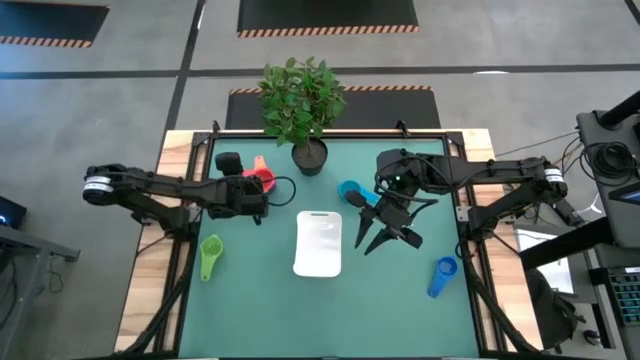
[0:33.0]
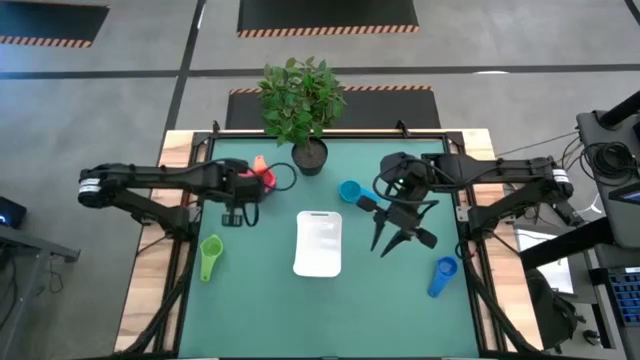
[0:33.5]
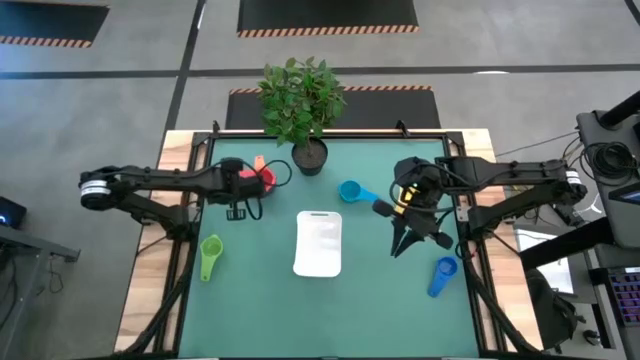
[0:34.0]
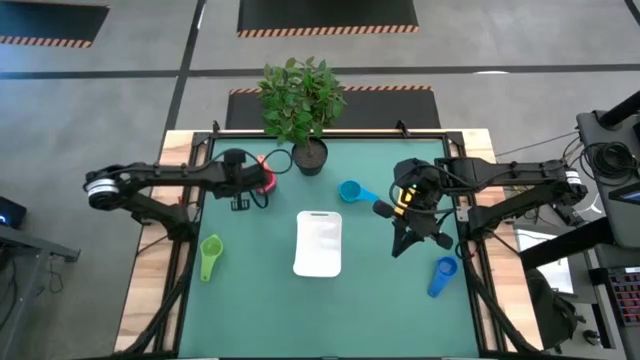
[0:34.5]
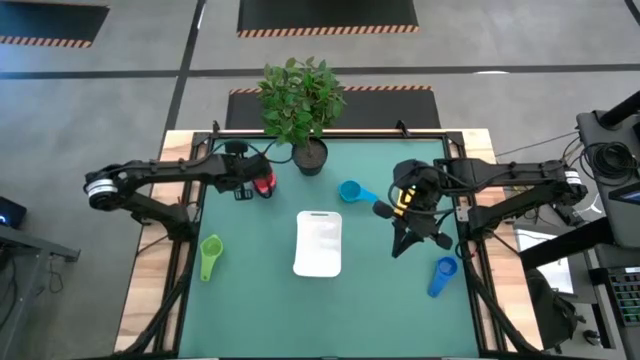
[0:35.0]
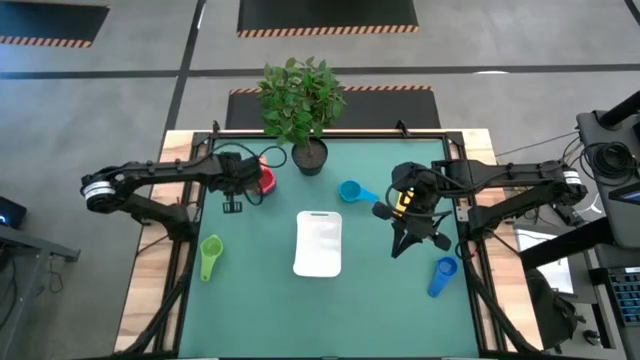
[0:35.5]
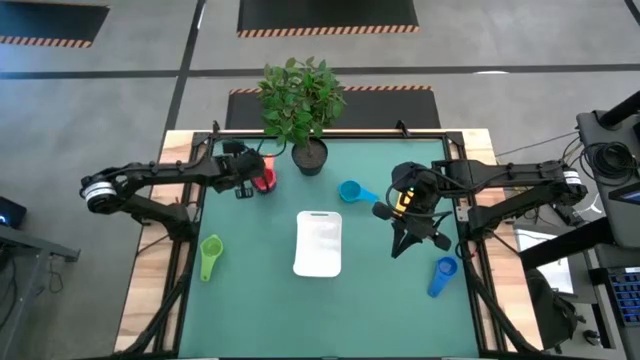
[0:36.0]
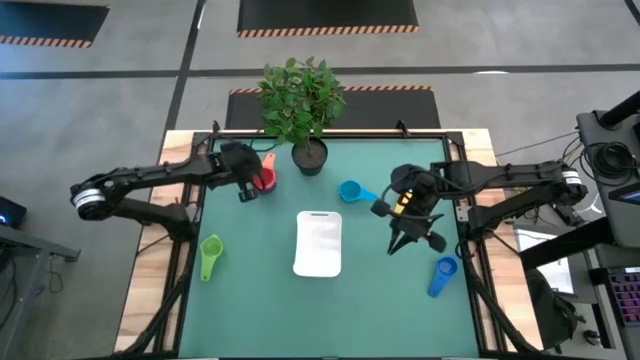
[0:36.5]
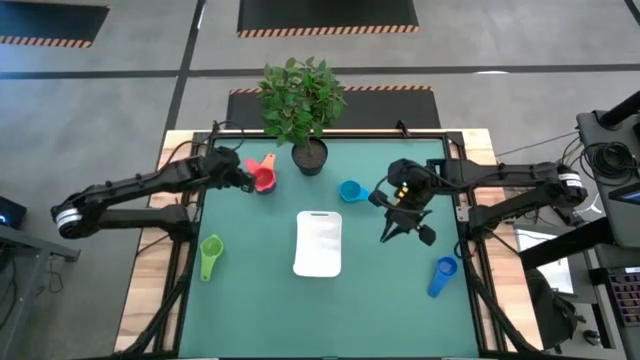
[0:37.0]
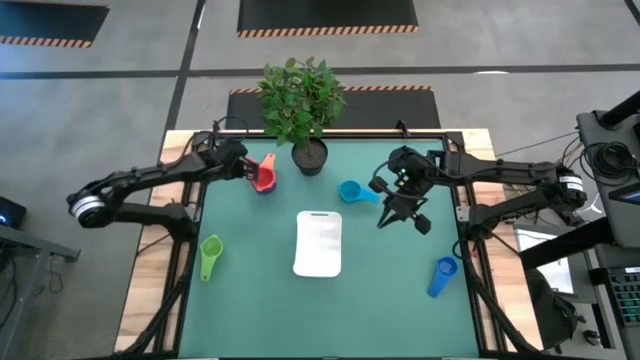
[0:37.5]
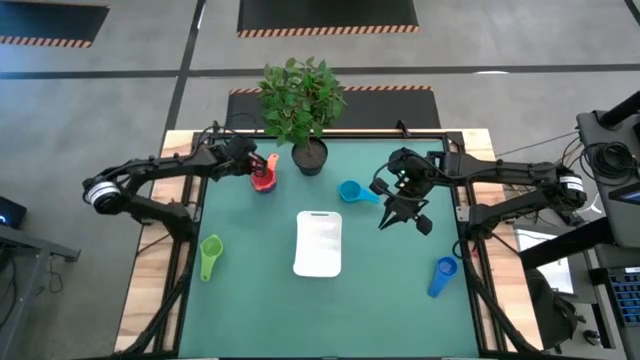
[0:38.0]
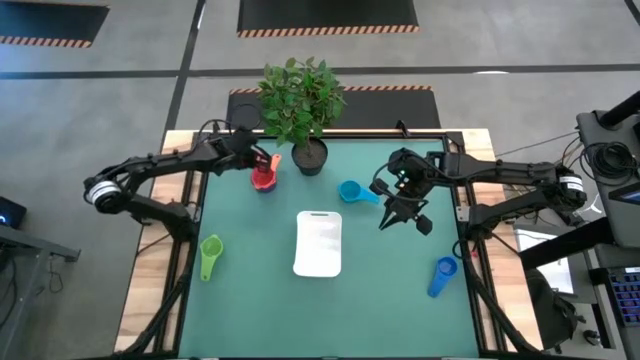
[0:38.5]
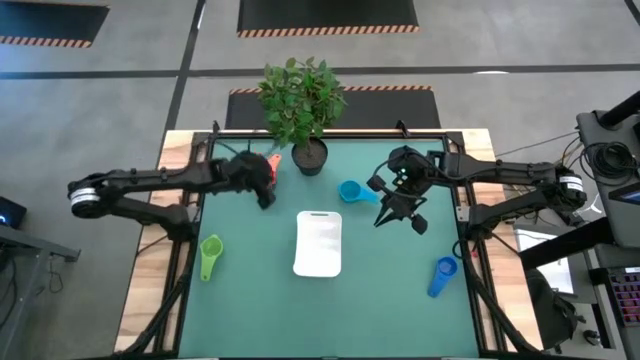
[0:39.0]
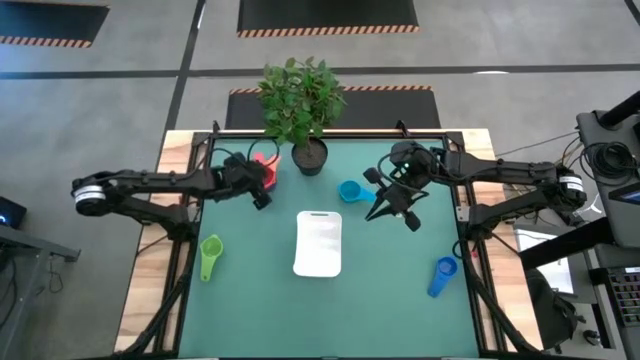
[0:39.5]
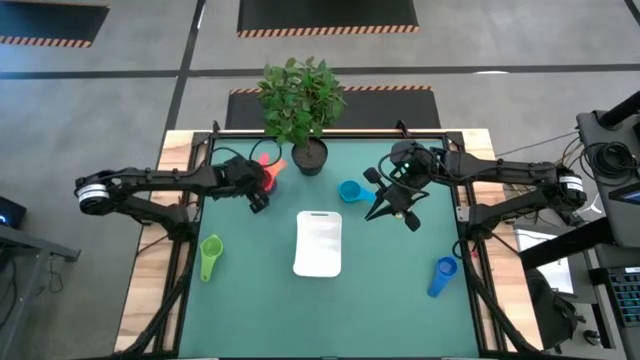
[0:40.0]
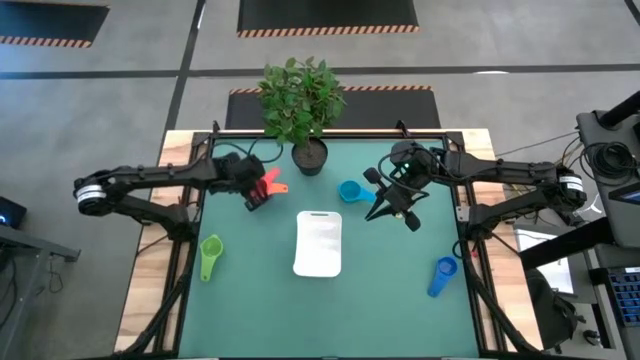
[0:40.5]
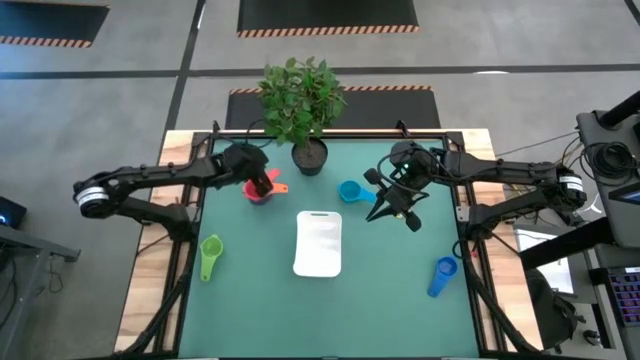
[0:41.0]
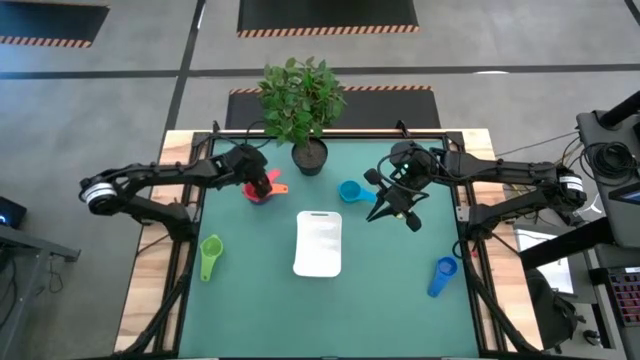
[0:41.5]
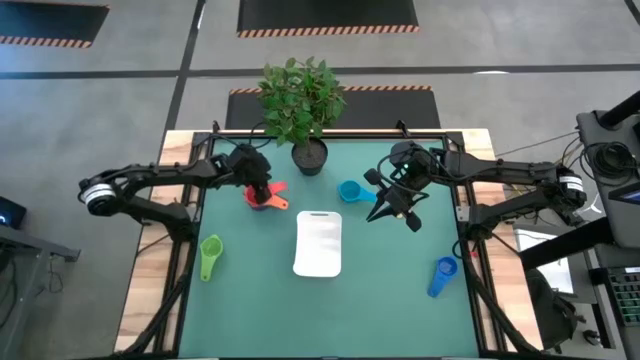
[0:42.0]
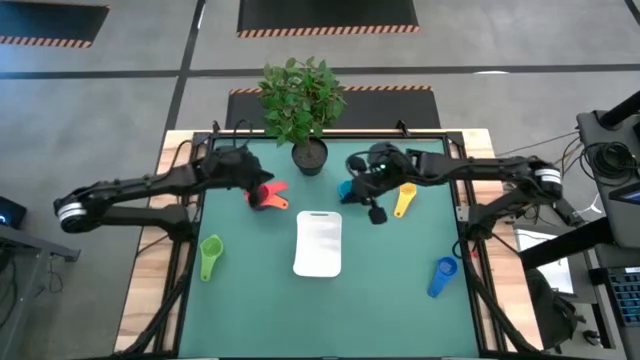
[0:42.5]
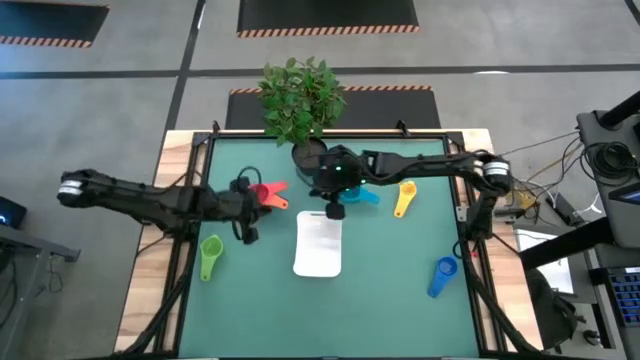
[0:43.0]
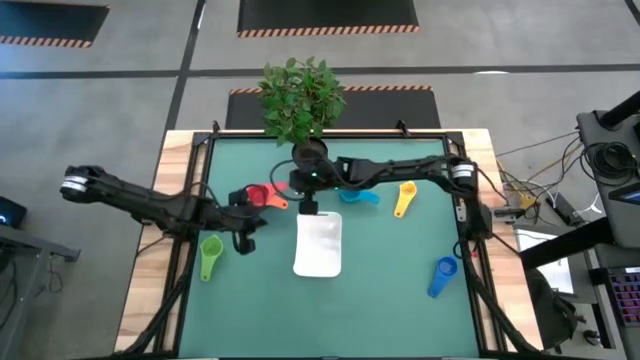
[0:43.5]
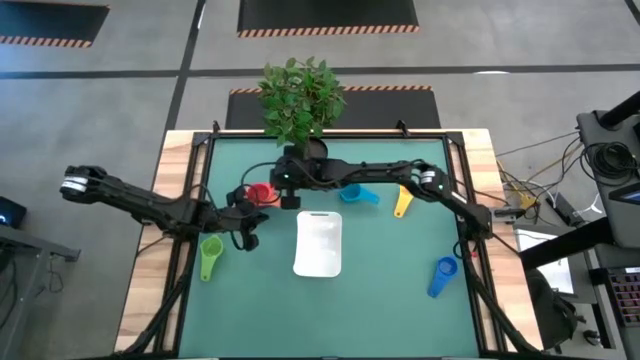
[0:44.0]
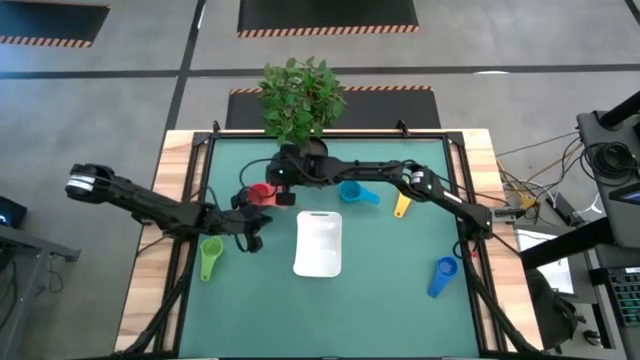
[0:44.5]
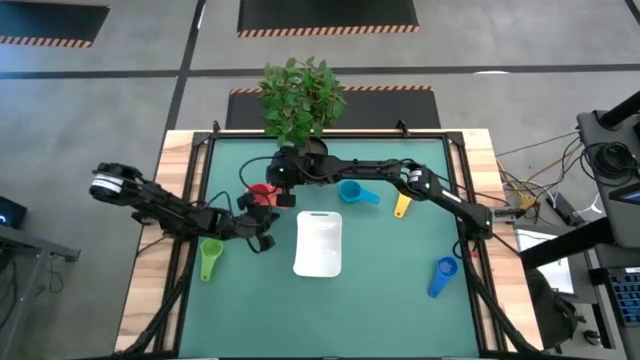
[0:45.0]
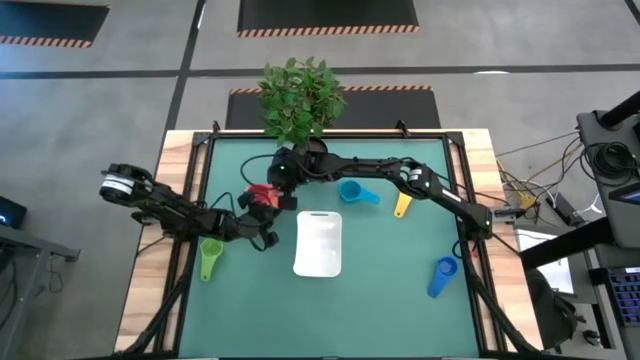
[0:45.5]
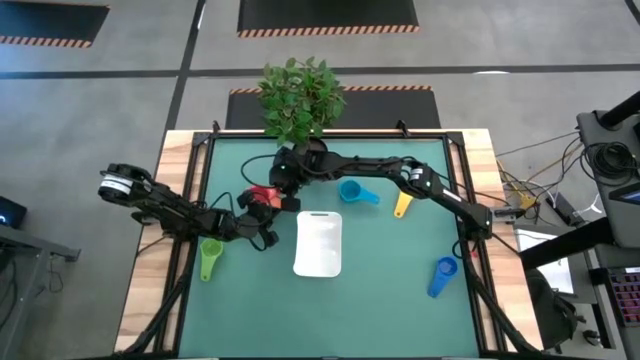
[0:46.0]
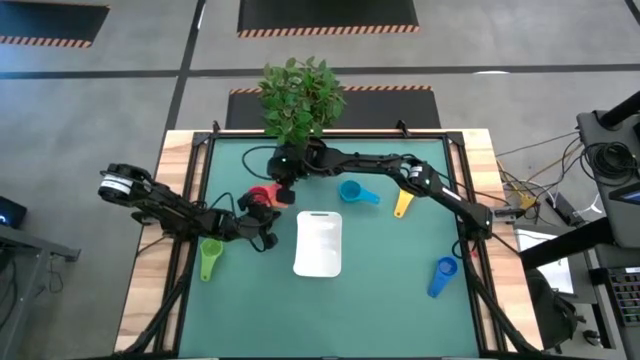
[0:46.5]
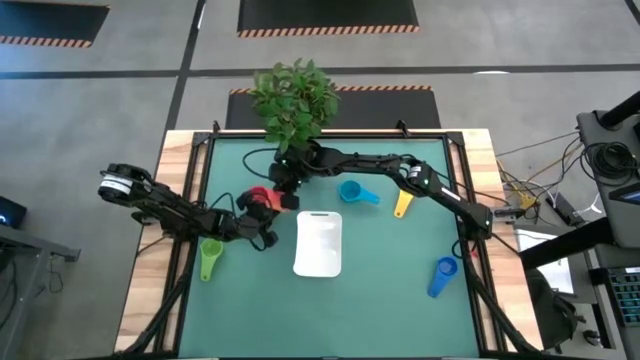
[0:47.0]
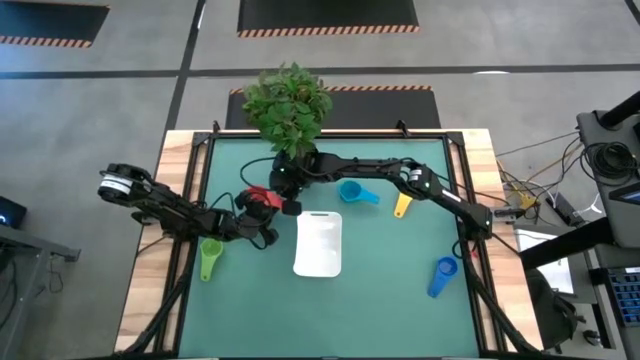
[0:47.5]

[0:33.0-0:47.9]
Task: Nest measuring cups in basket
Stack the red measuring cup on top of the orange measuring cup

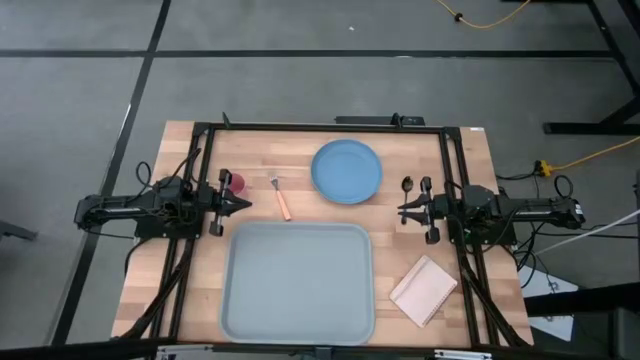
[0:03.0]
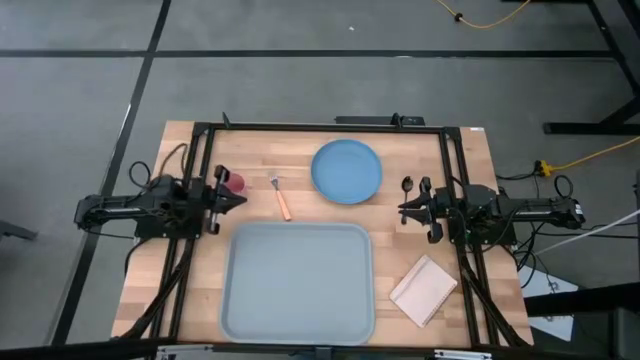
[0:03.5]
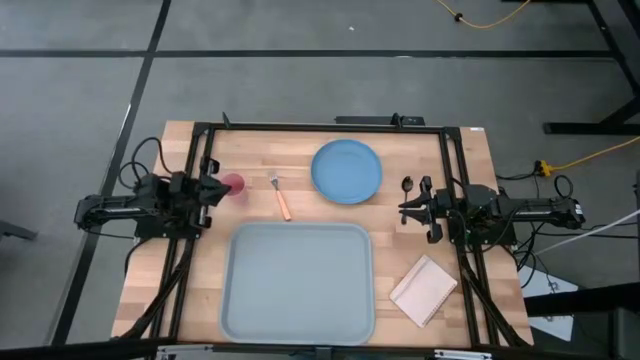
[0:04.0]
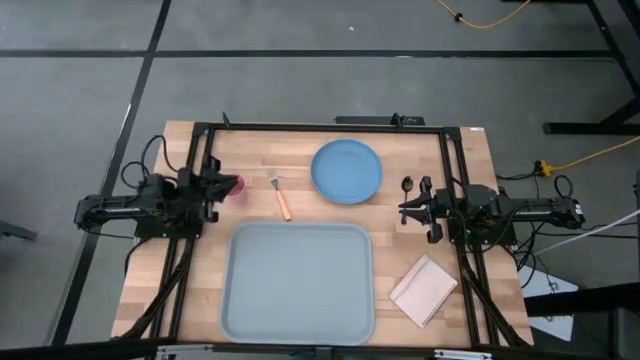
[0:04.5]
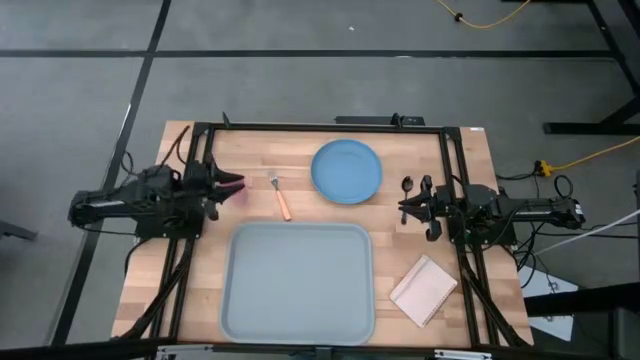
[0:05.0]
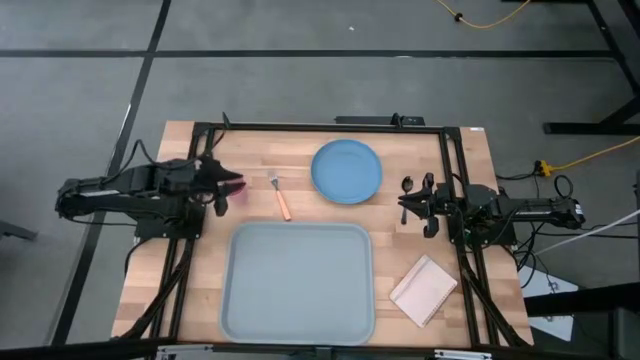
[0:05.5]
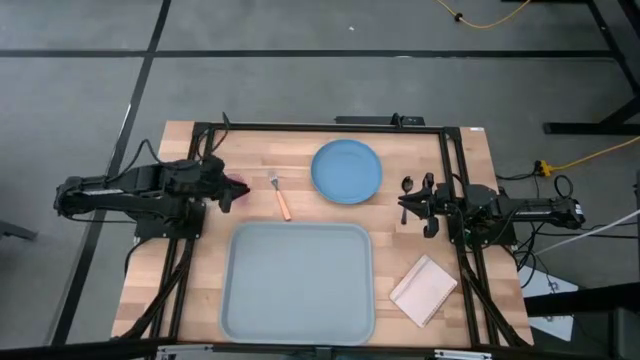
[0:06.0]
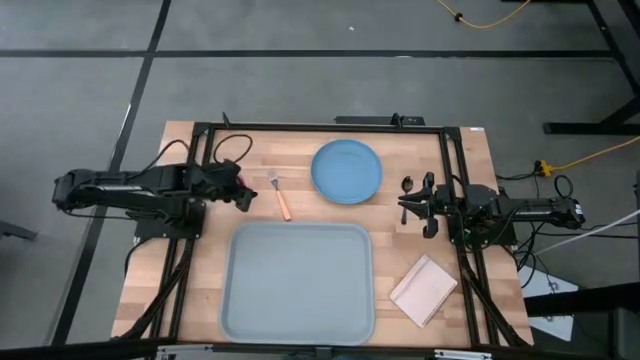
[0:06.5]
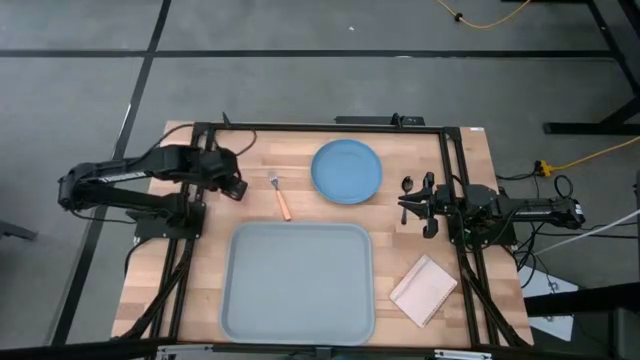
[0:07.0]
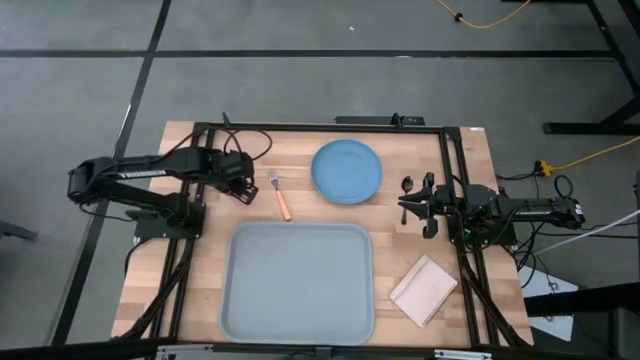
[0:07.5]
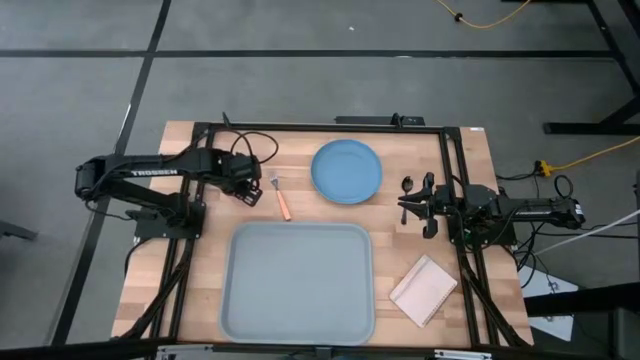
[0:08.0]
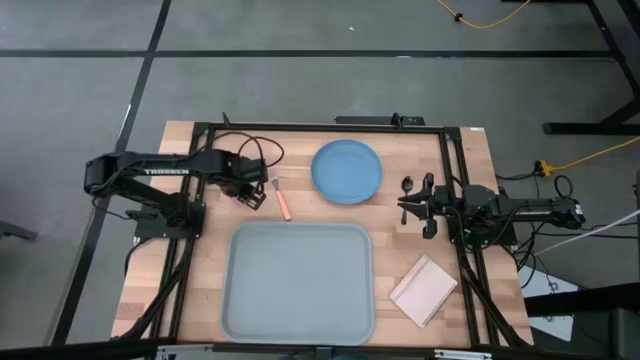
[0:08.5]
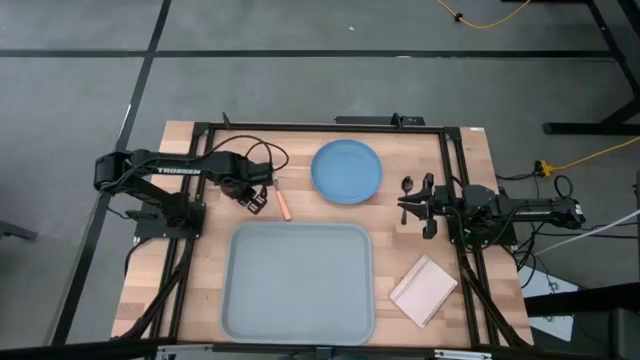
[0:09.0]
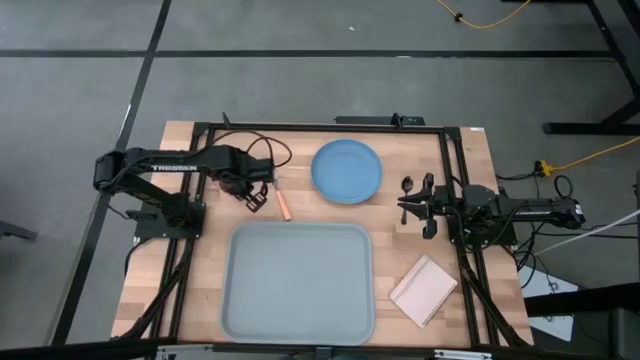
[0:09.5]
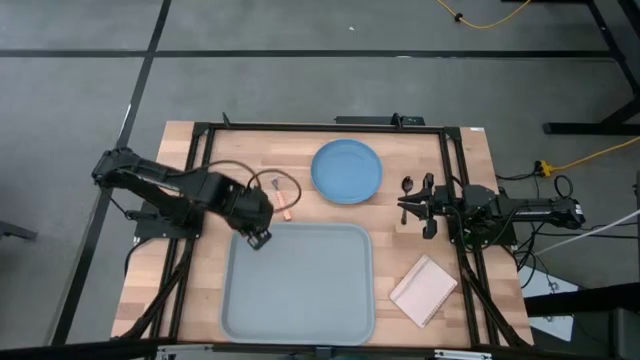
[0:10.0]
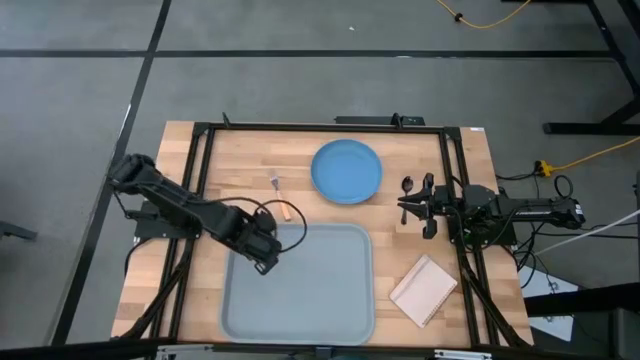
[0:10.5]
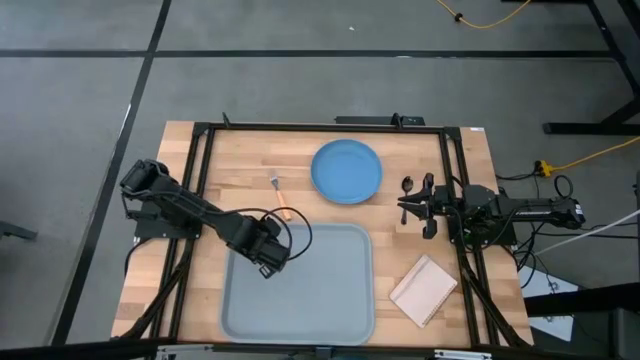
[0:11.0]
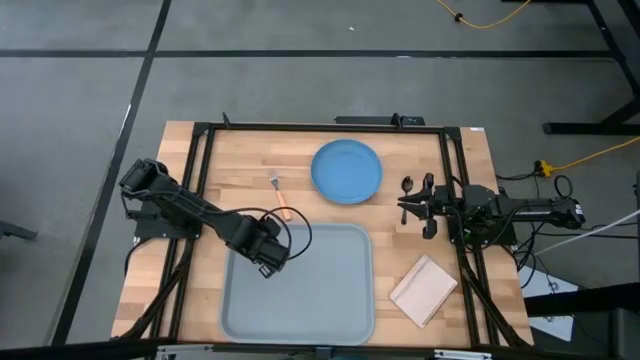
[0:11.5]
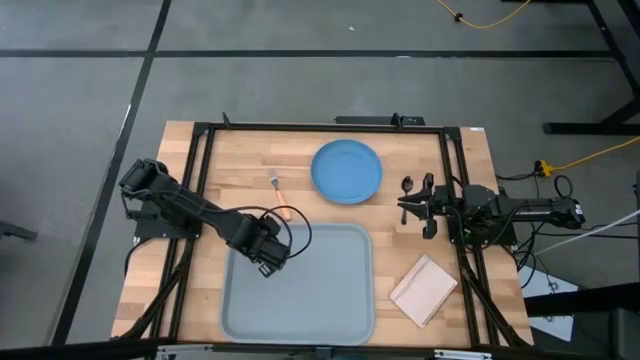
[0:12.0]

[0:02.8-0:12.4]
Task: Pick and place plate/cup/fork/spoon on tray
Put the pink cup on the gray serving tray
